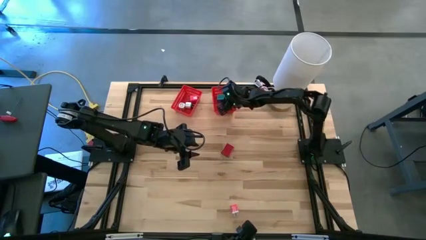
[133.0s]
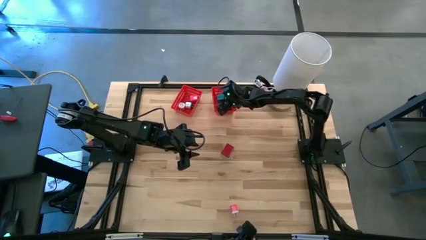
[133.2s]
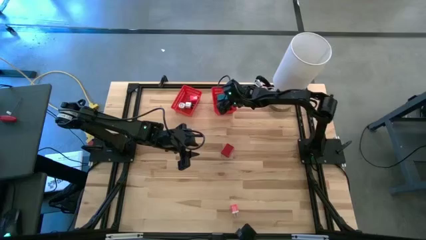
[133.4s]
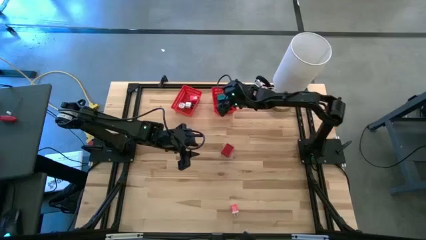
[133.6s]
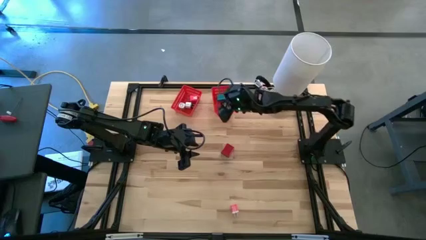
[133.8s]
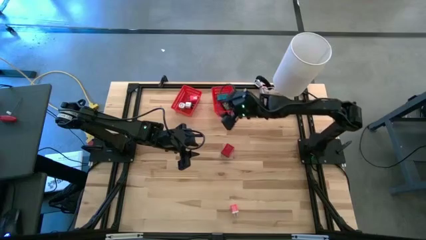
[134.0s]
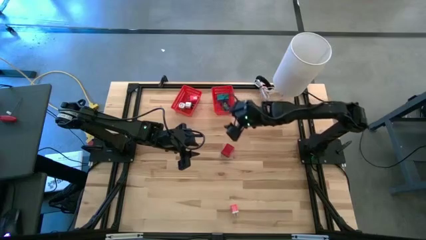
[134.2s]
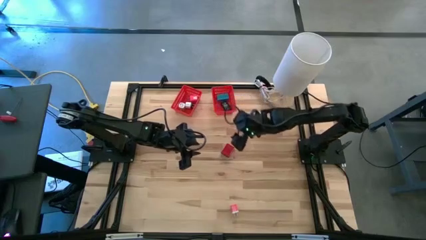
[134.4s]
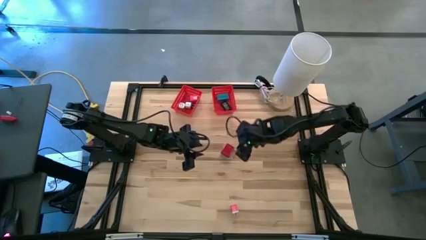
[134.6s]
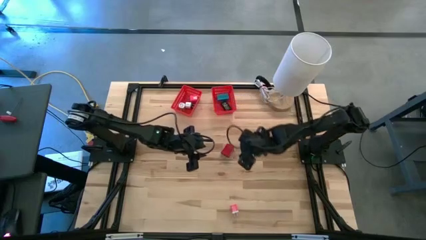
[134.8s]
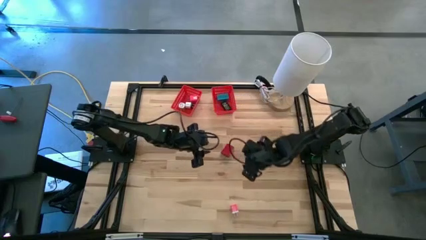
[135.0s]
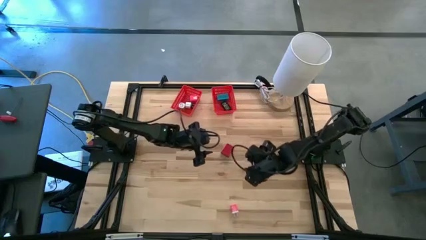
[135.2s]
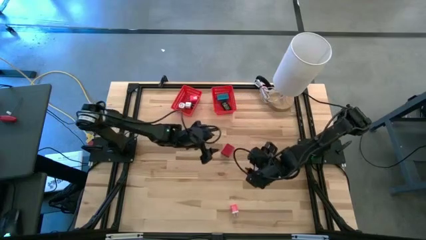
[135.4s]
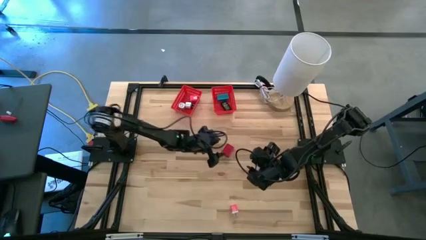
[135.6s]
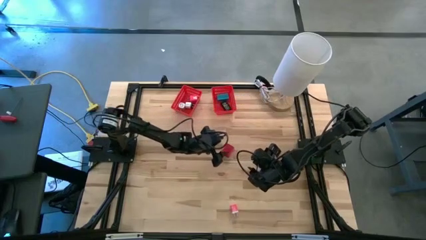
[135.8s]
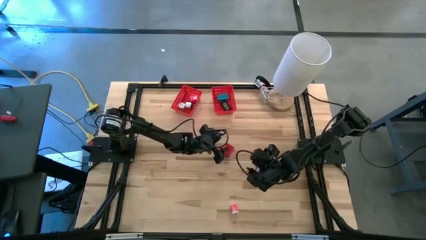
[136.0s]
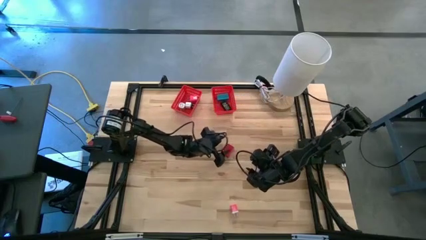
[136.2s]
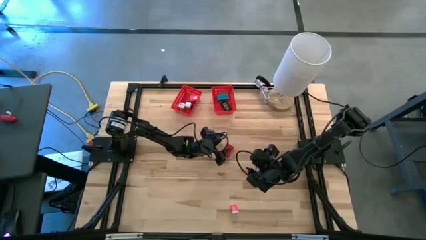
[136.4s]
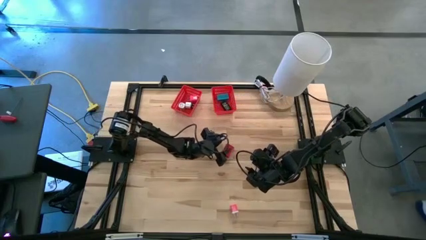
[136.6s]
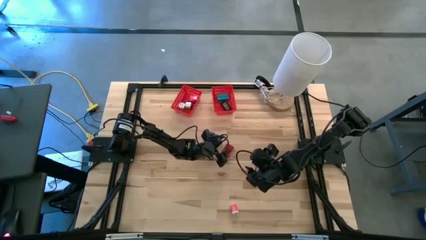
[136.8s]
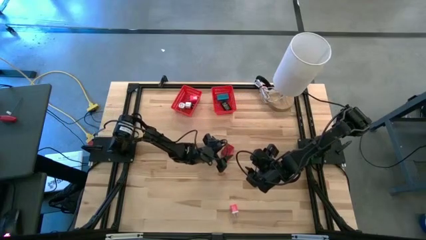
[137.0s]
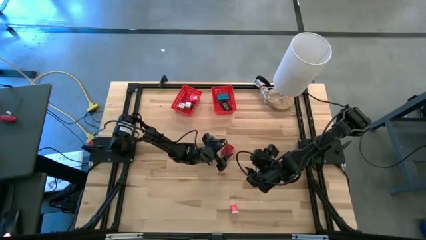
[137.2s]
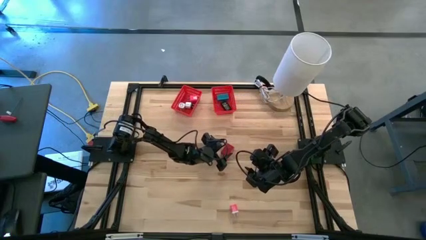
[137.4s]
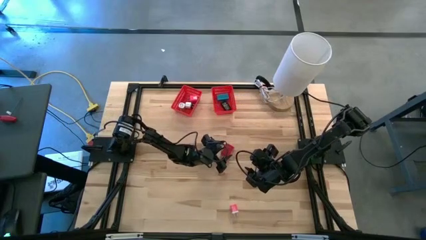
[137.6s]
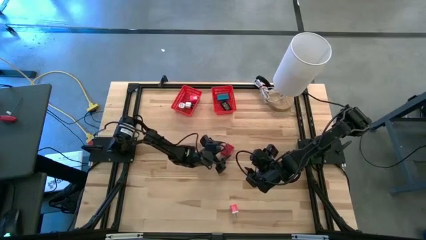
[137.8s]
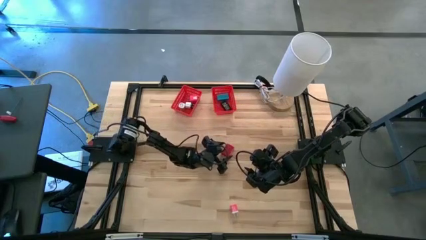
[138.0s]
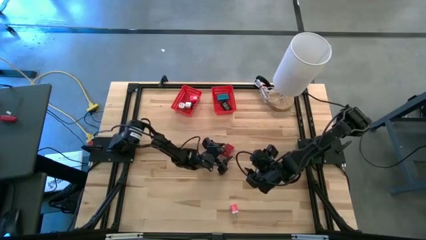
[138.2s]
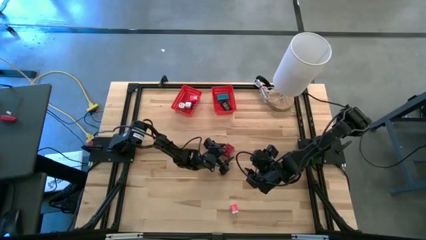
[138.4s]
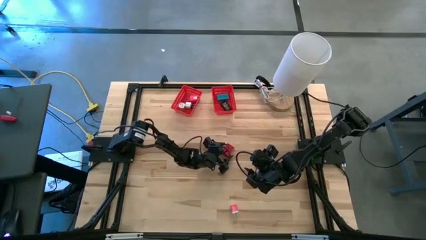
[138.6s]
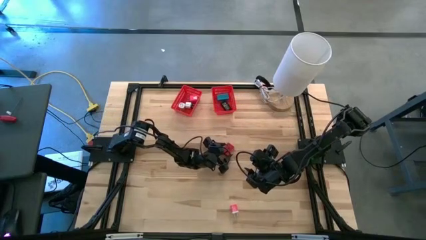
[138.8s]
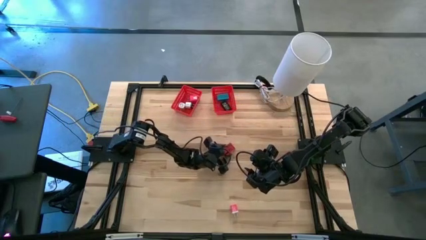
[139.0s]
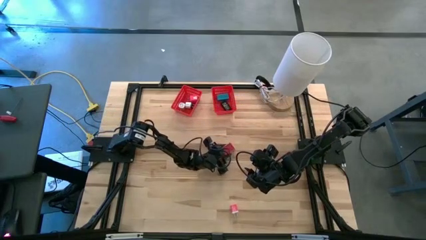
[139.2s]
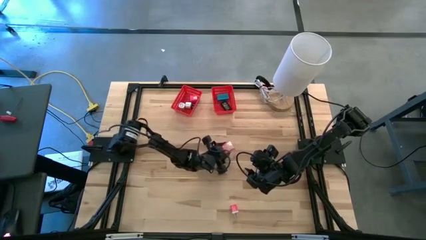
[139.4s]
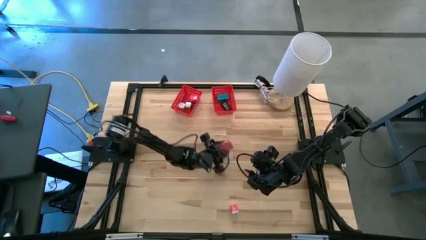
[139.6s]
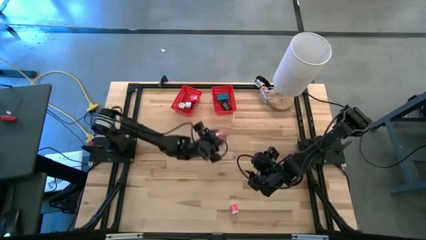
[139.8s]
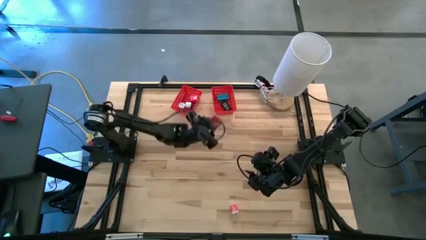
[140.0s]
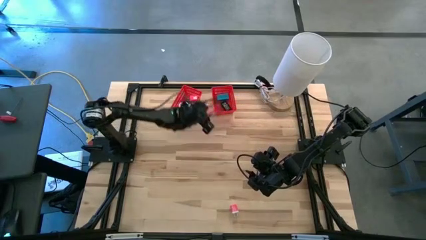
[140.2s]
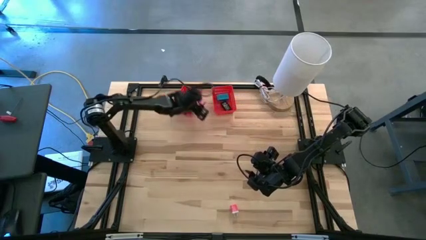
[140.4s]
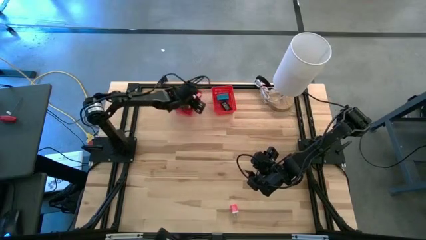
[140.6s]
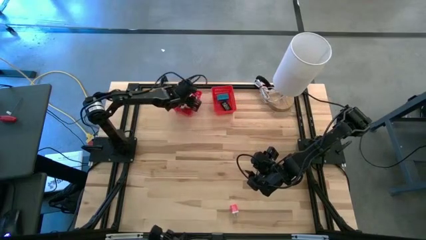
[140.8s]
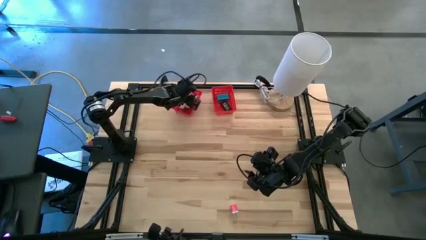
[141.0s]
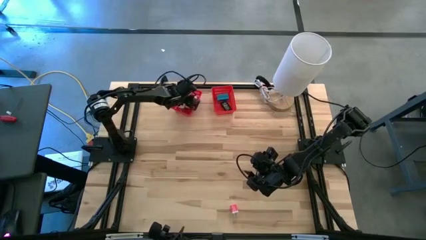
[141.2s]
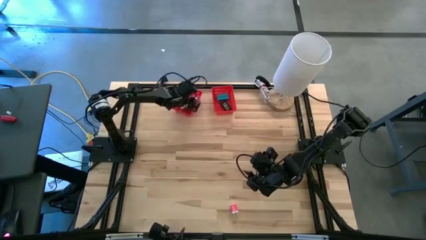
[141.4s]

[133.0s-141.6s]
Task: Pick & Place Office items
Put the red charger adapter into the left red bin

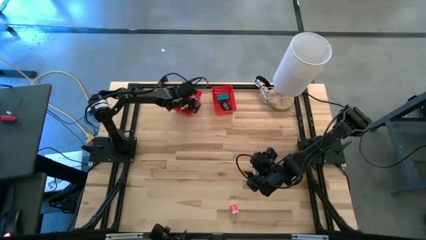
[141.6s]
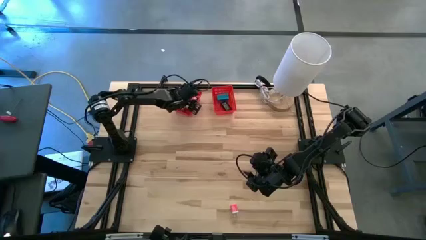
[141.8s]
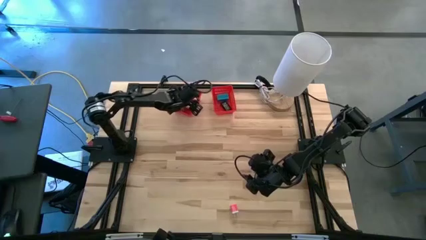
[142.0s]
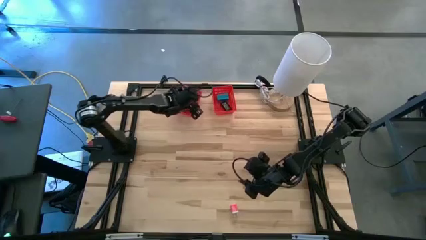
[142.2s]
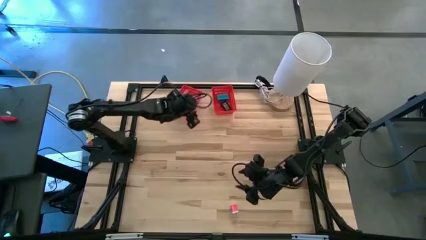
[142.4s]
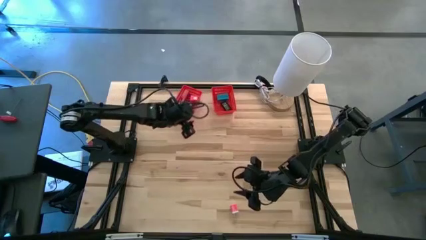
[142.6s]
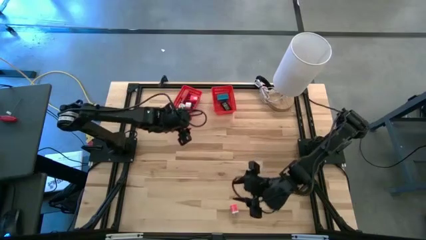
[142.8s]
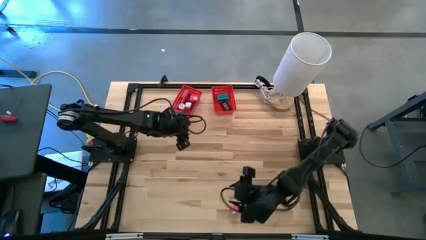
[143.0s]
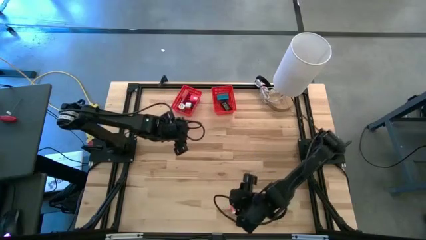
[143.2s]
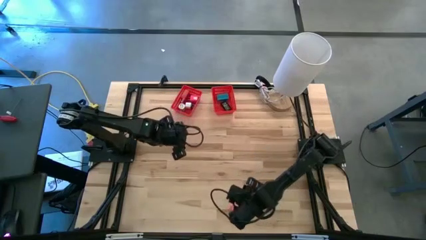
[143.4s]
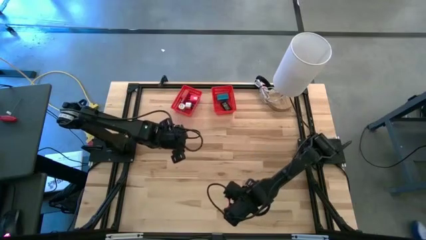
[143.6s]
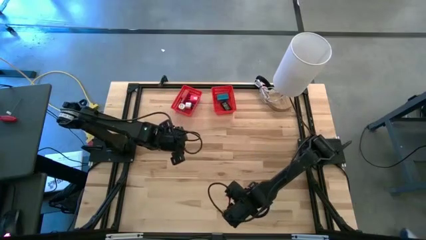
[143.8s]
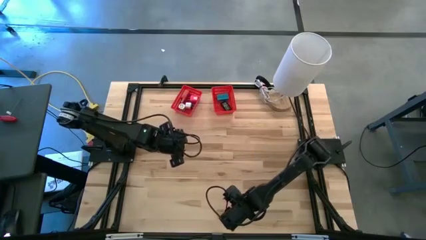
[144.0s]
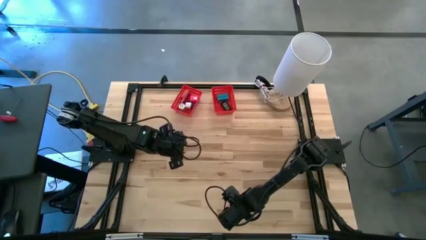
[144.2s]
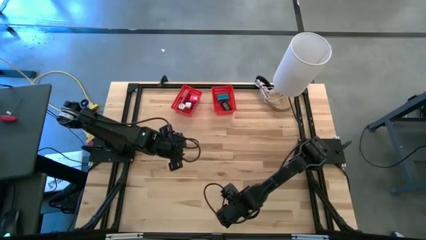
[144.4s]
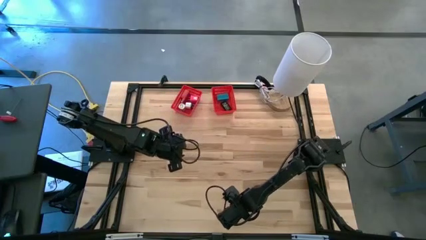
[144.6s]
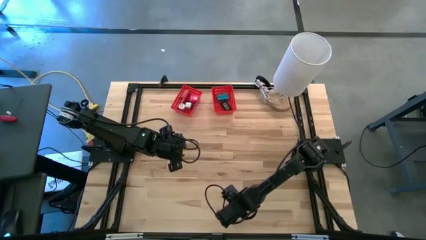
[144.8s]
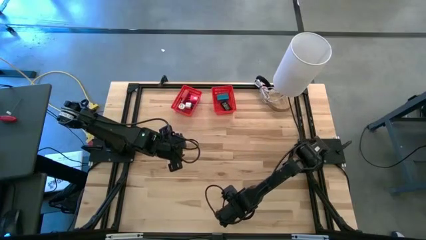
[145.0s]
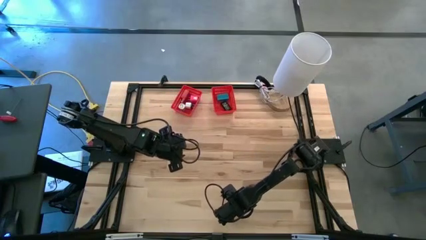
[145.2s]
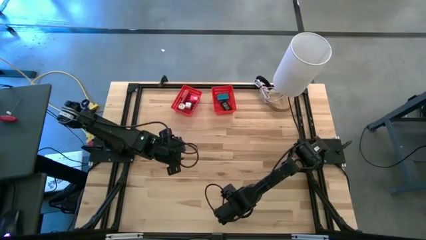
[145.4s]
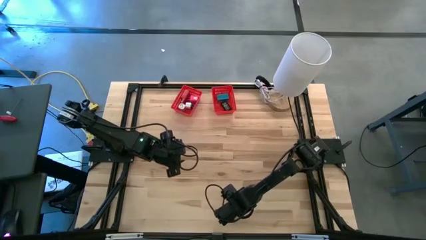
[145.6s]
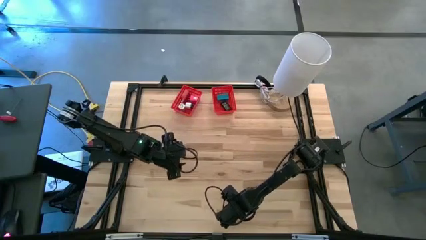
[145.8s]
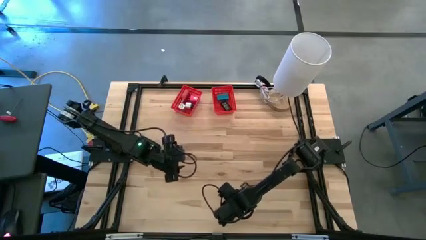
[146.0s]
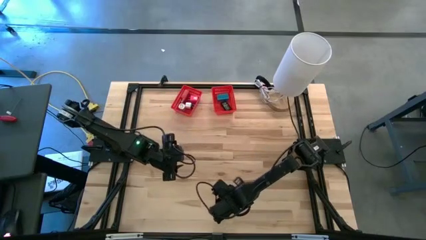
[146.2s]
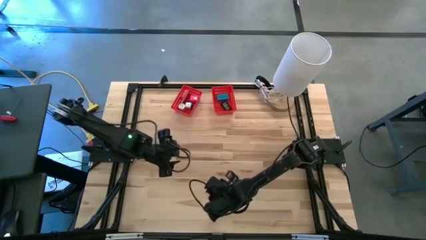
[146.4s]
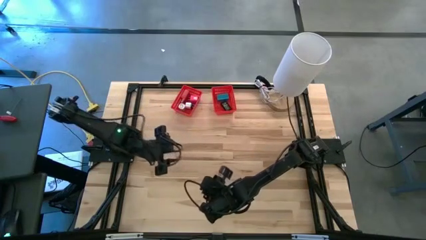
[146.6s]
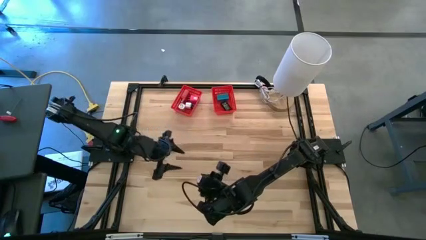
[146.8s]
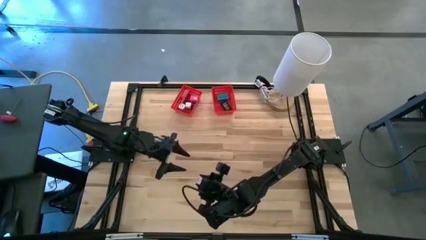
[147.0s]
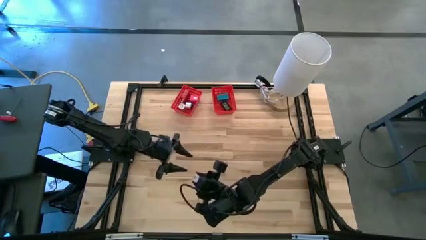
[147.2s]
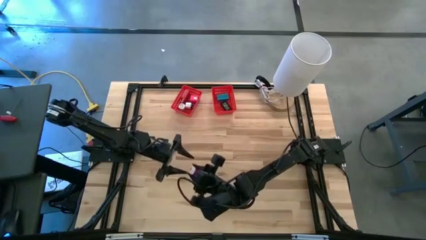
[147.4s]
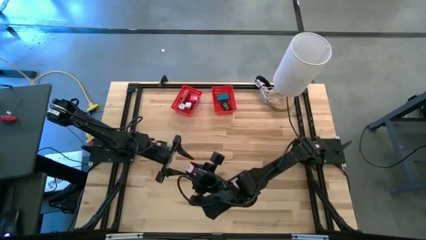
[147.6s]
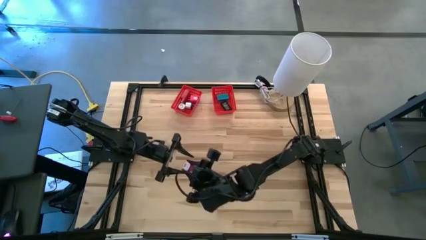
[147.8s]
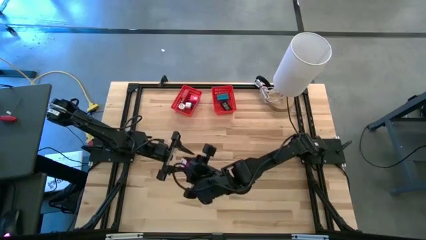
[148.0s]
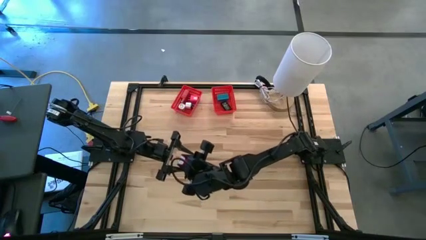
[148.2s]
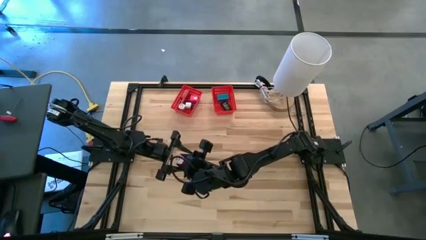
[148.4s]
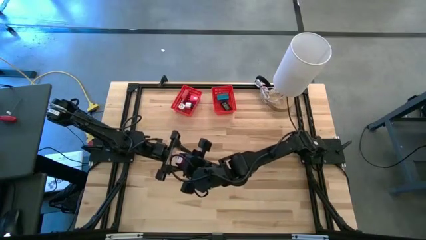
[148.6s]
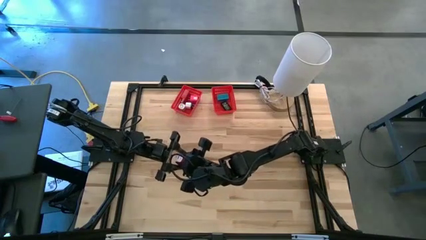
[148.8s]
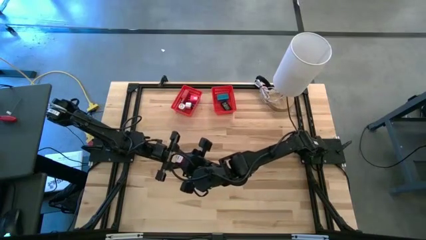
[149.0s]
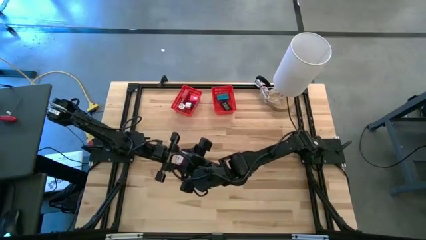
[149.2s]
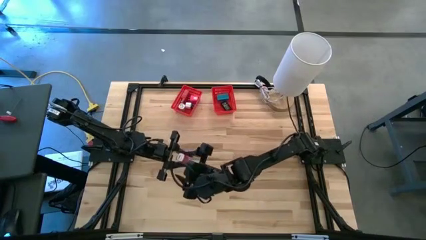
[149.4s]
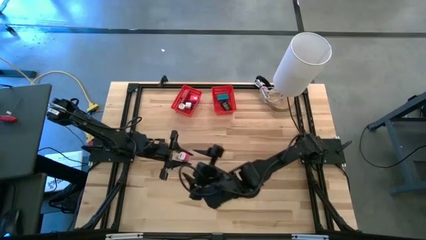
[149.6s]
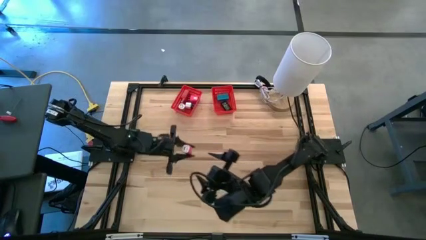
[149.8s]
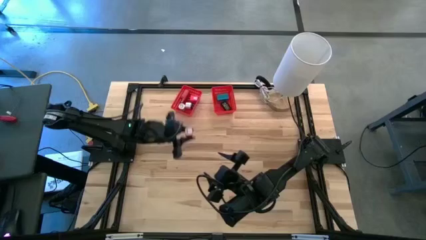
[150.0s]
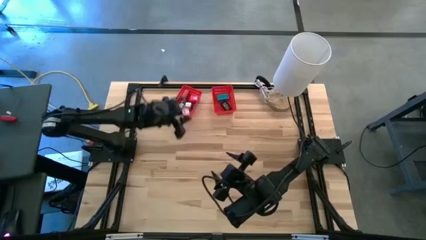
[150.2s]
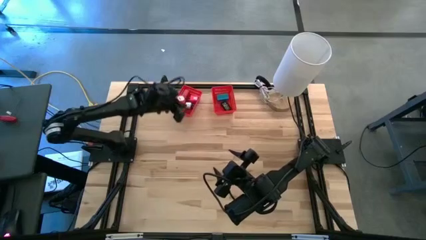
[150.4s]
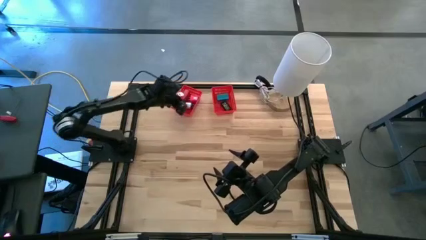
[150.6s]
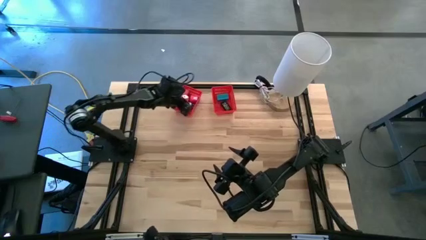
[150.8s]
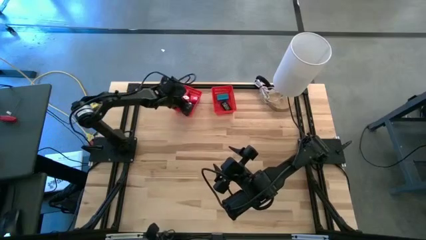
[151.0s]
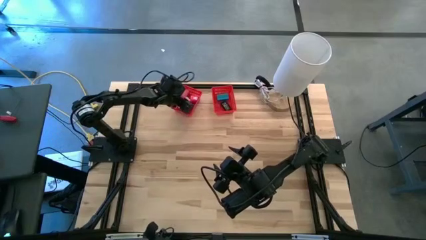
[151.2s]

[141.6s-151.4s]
Put the pink charger adapter into the left red bin
